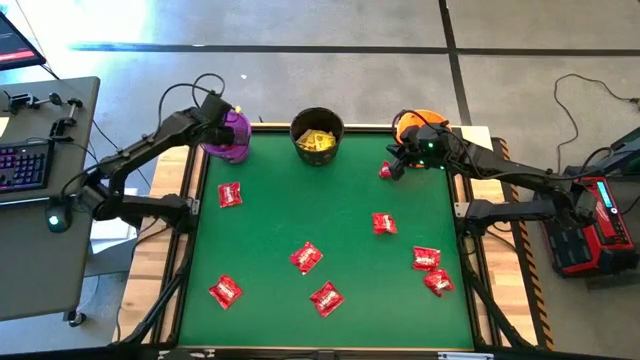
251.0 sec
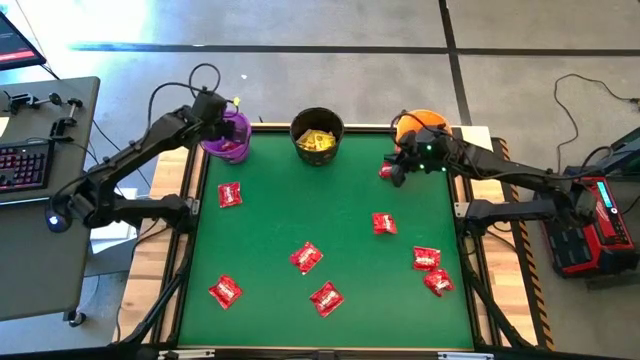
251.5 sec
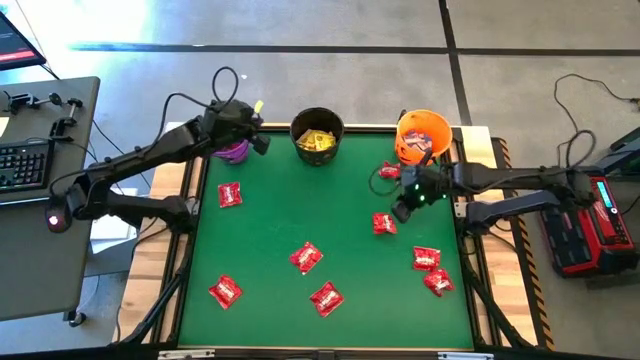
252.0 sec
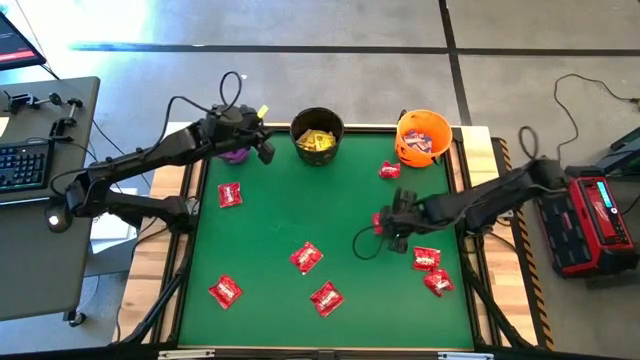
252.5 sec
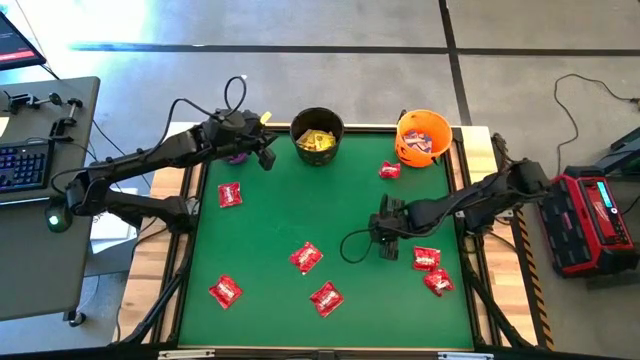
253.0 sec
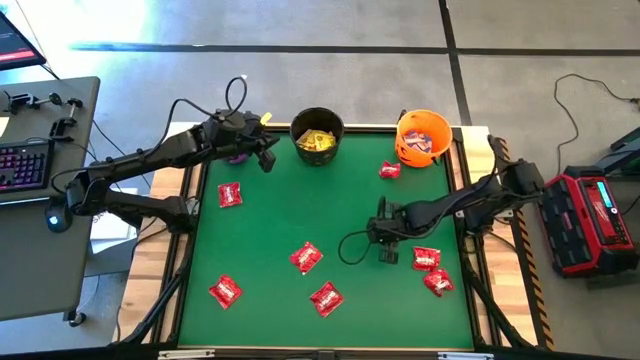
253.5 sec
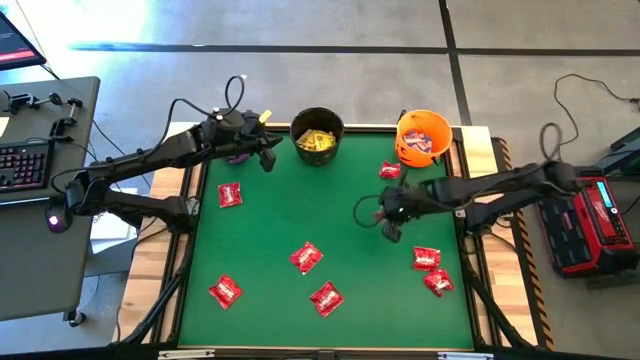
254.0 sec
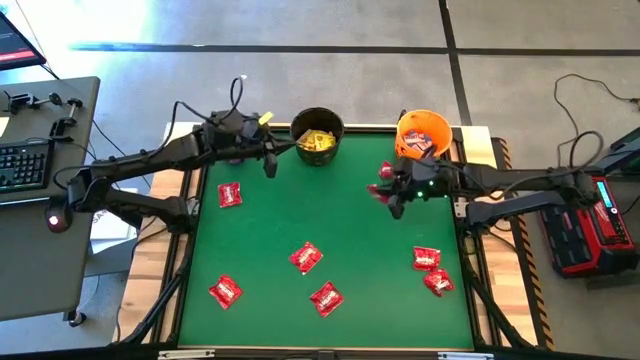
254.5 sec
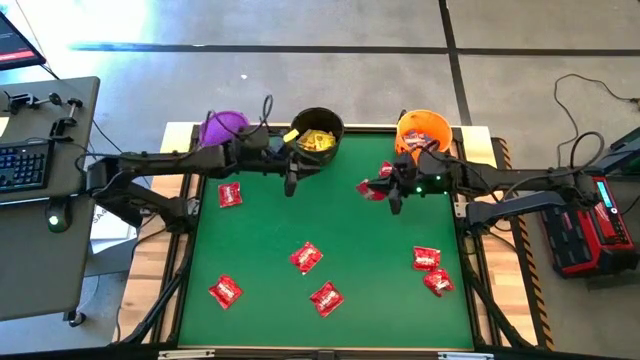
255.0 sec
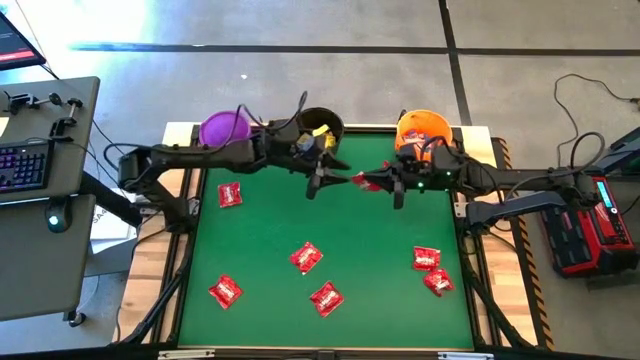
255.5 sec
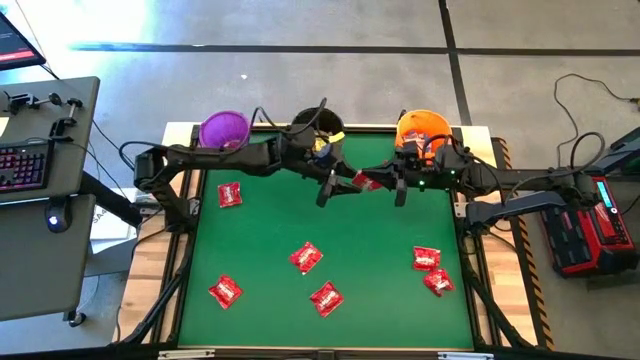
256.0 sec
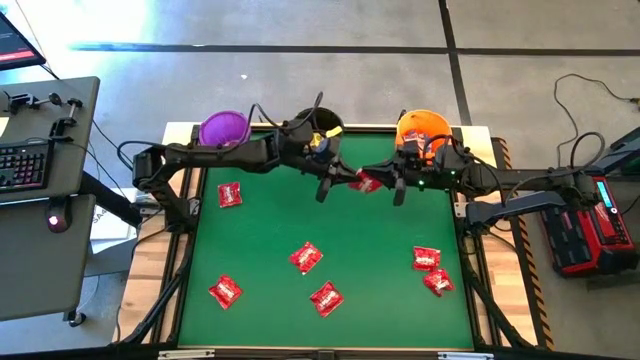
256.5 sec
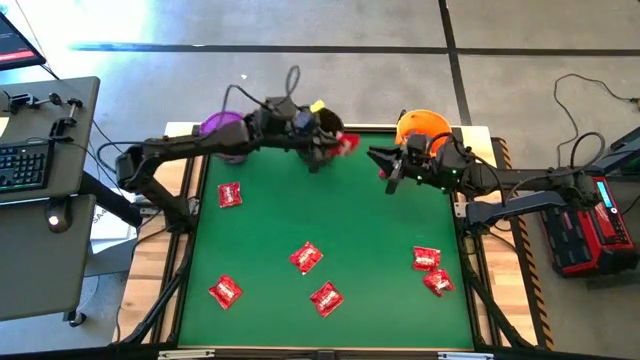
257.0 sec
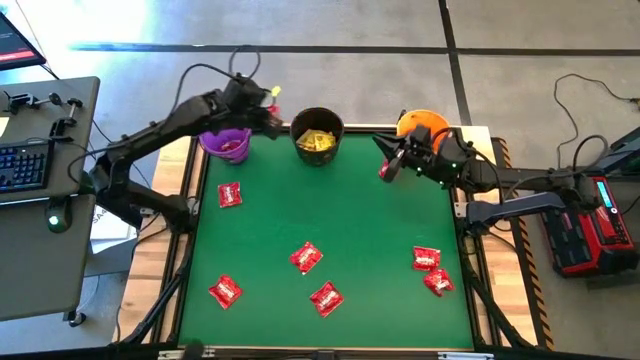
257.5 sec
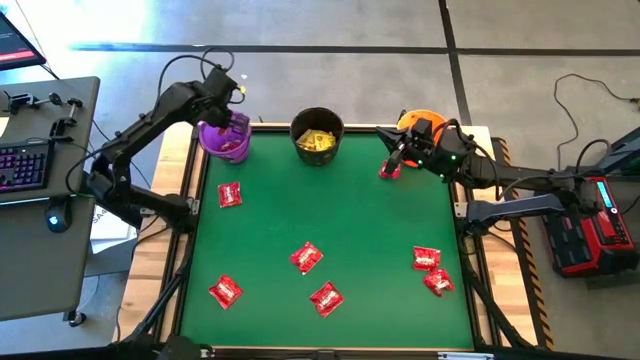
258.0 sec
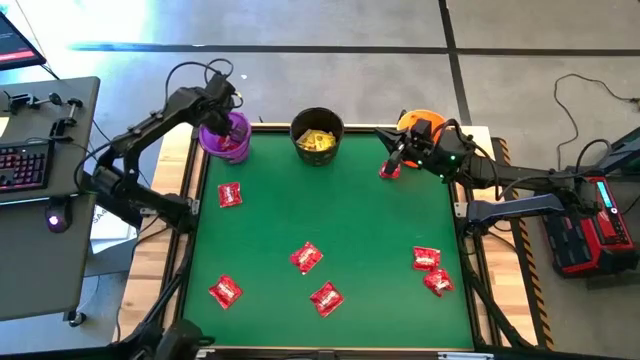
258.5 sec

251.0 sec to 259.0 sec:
Task: Sort candy by brand, put in halloween buckets
Put the red candy pack into the violet bucket

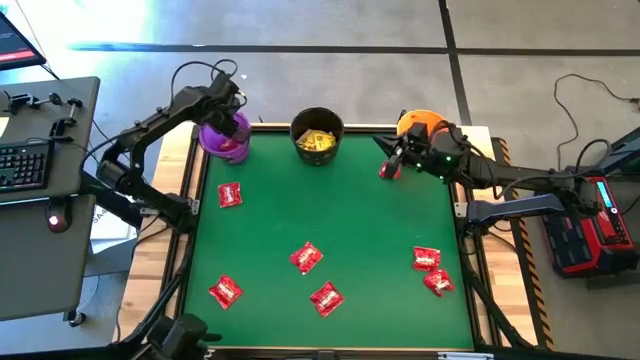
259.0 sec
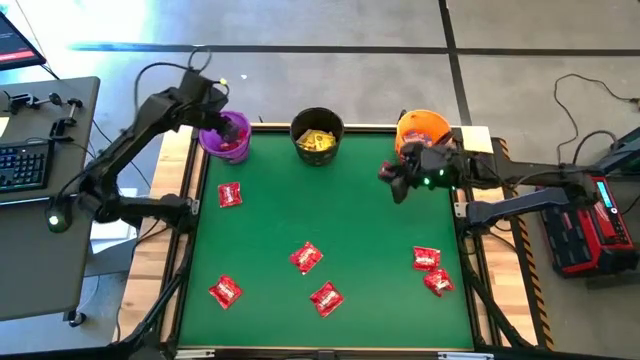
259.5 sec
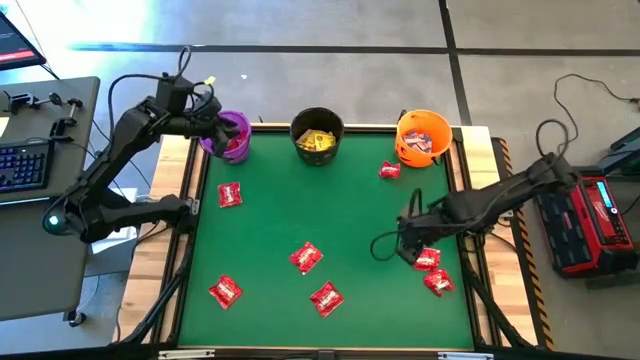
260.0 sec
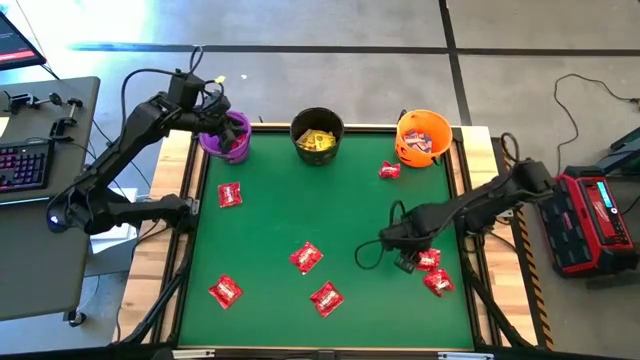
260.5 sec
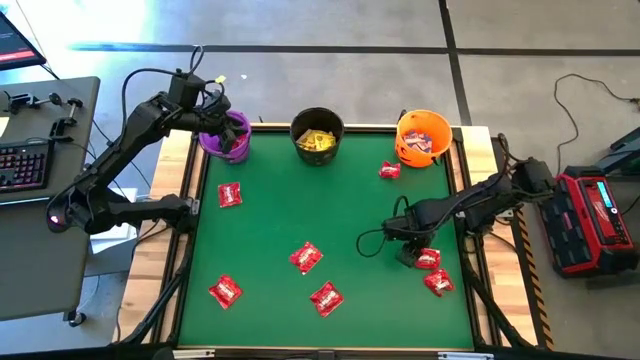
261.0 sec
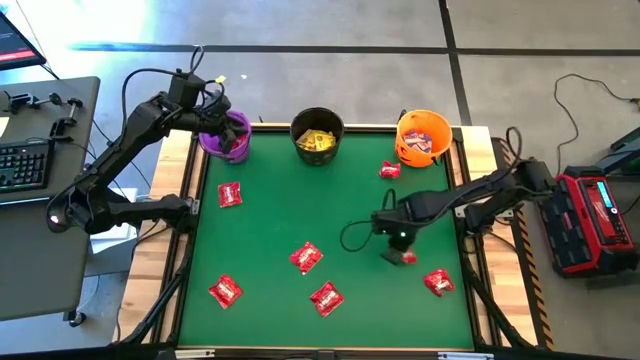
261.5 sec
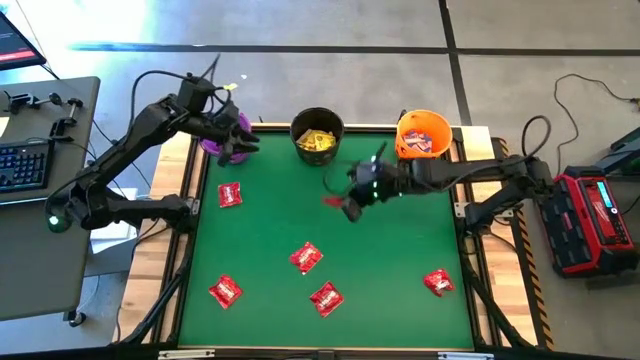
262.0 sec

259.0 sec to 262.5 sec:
Put the red candy pack into the violet bucket

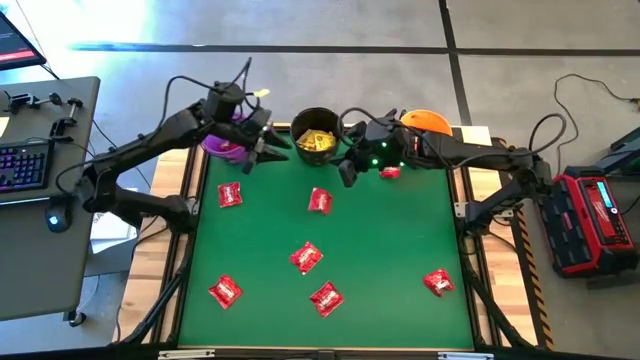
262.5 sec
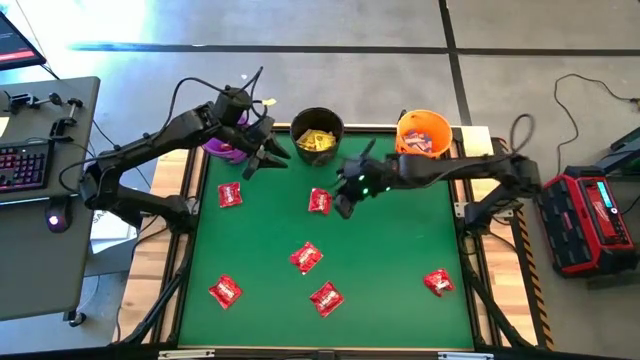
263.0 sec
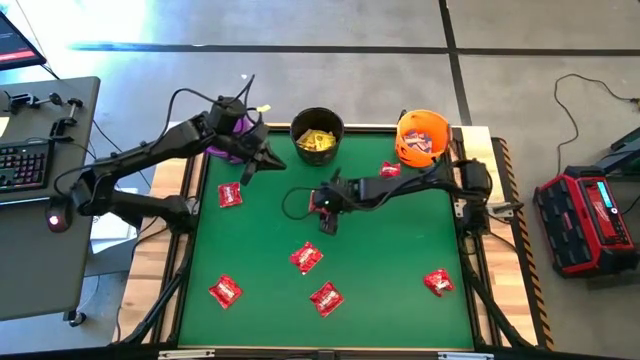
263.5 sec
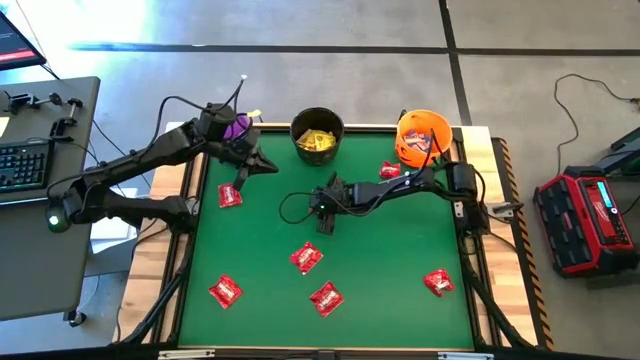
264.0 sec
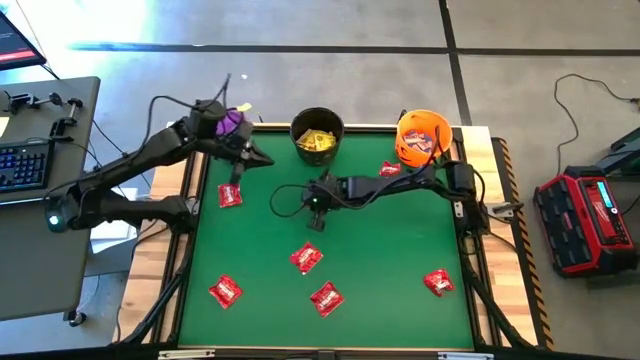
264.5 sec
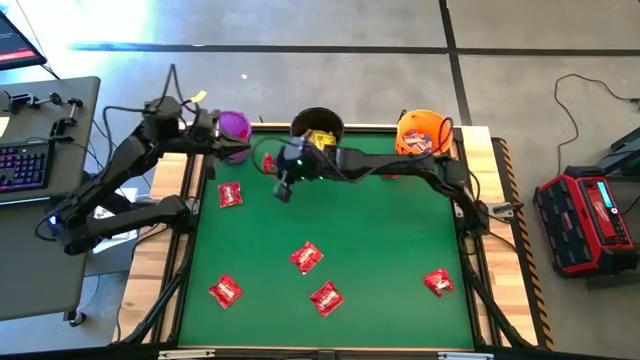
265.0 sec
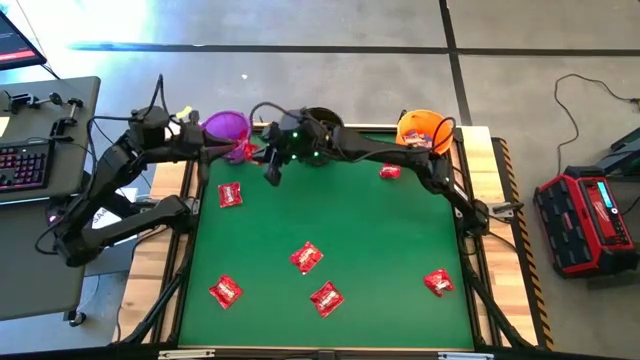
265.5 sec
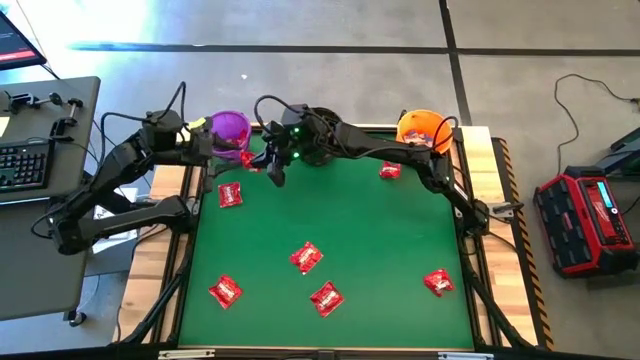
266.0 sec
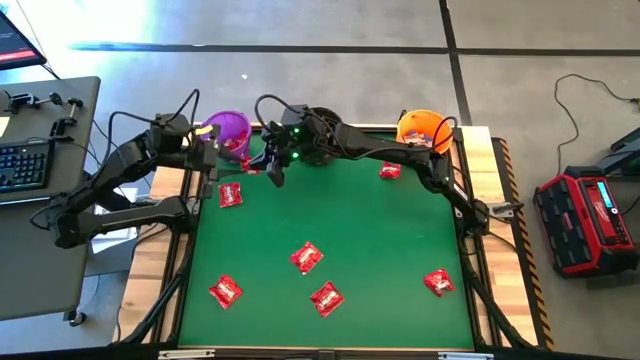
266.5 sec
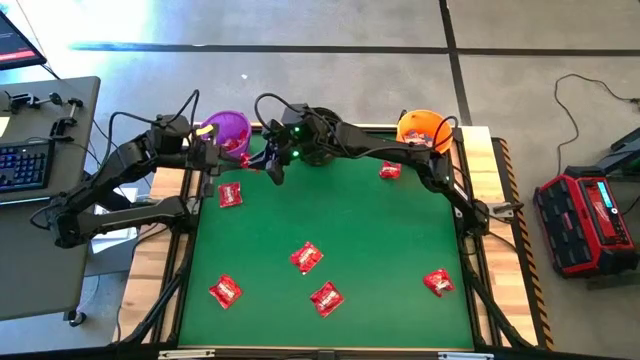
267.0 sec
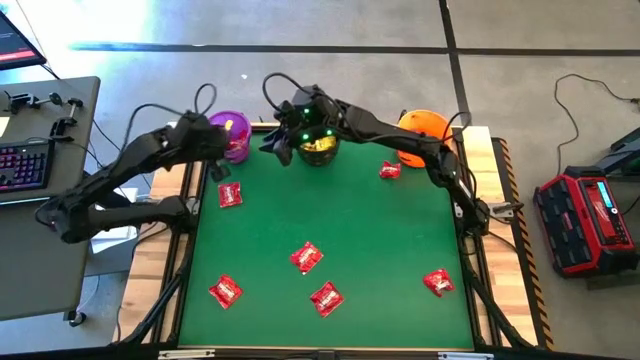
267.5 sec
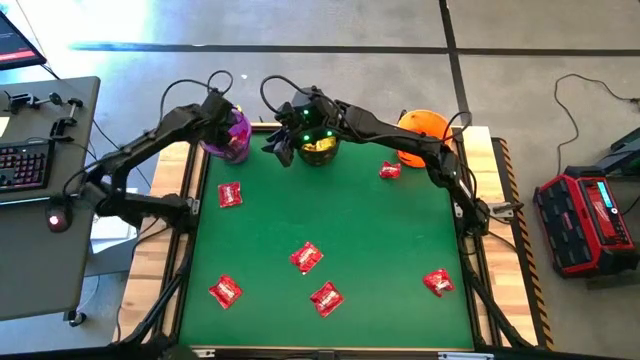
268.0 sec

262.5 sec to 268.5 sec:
Put the red candy pack into the violet bucket

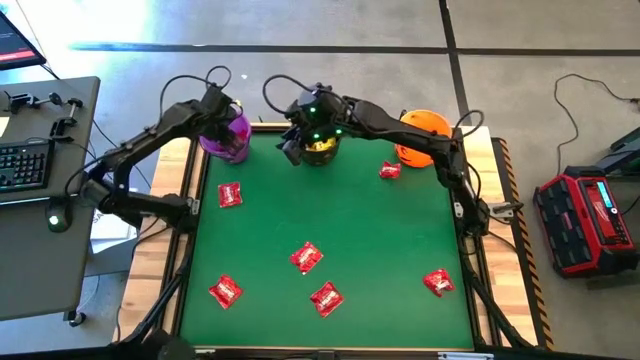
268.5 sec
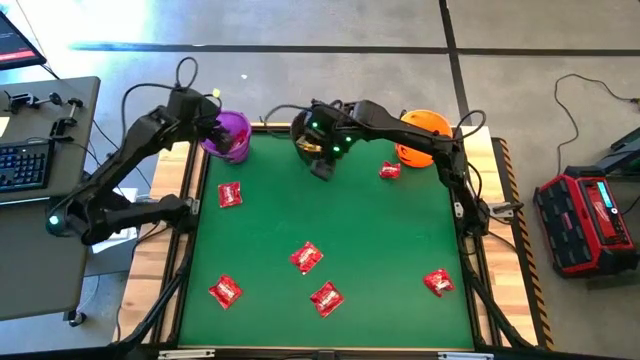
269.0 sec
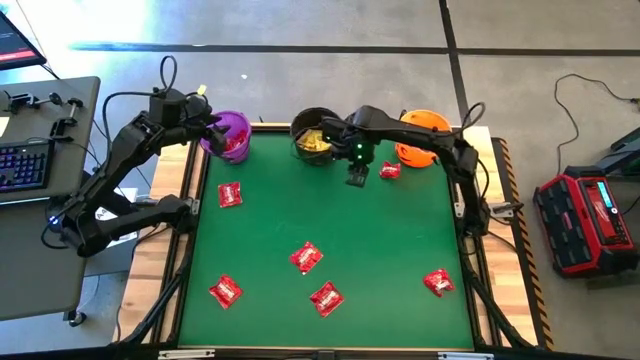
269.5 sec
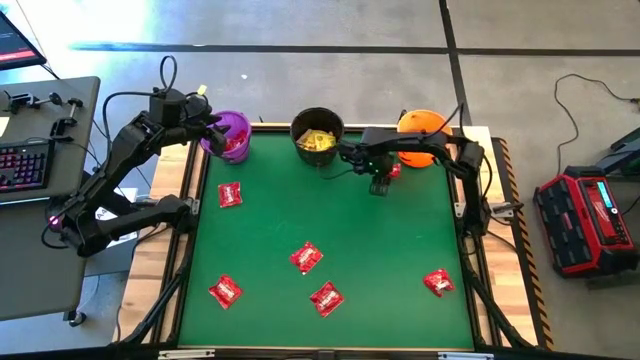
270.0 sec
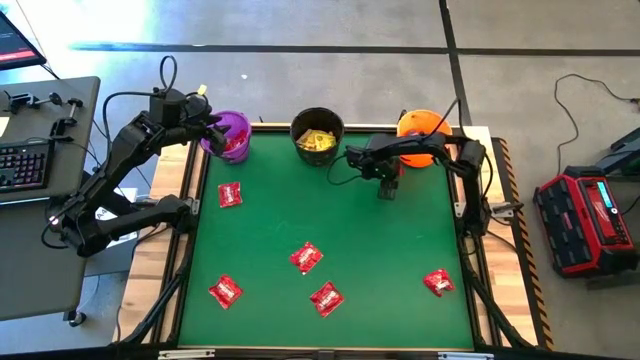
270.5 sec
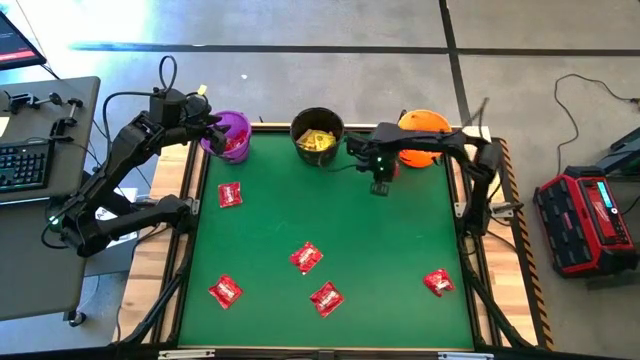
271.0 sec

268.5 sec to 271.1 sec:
Put the red candy pack into the violet bucket
